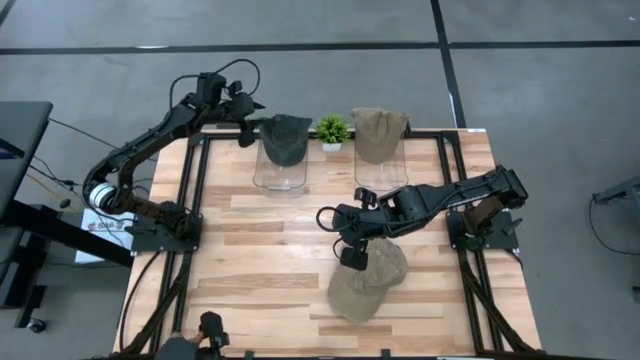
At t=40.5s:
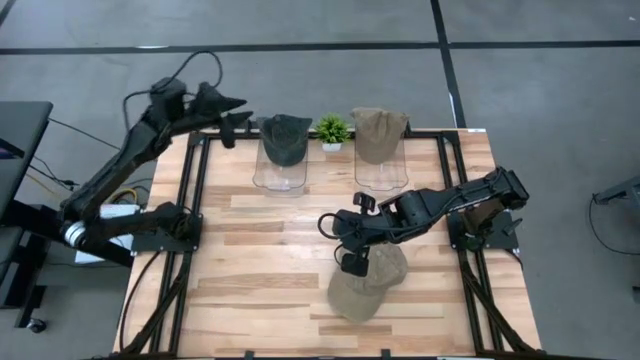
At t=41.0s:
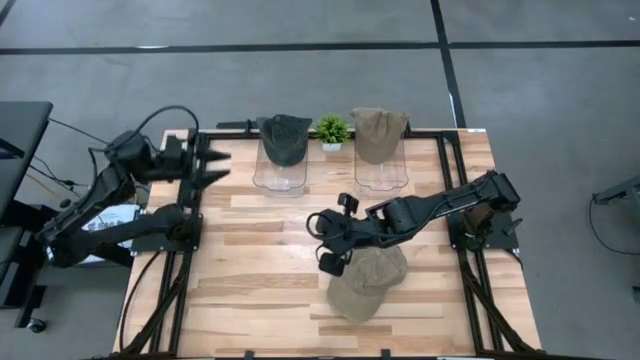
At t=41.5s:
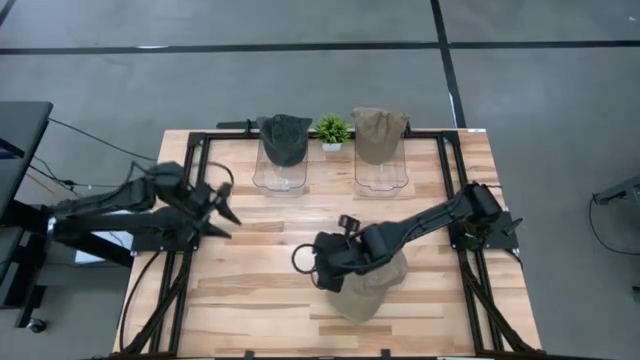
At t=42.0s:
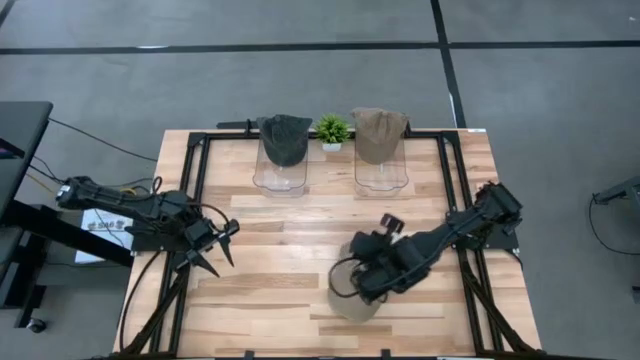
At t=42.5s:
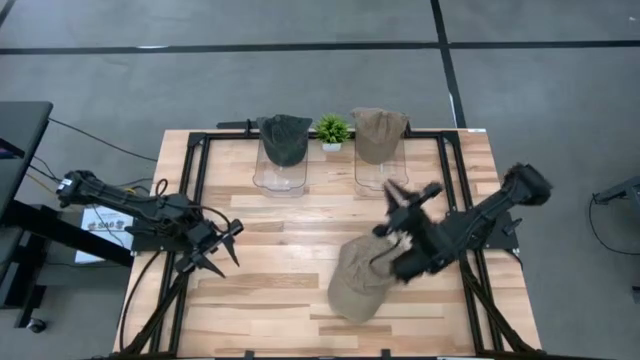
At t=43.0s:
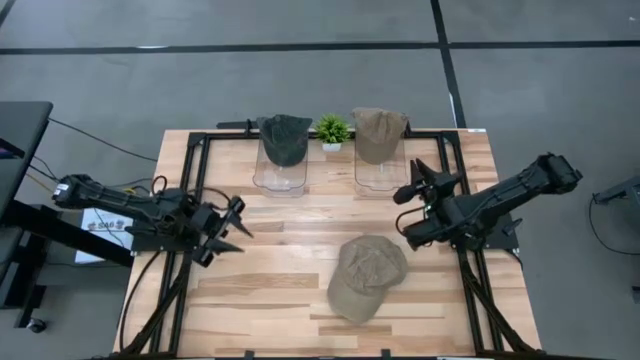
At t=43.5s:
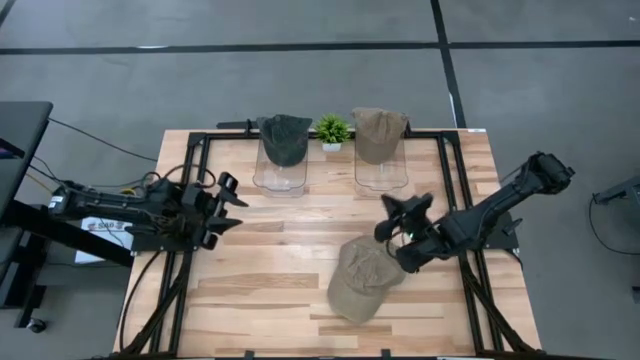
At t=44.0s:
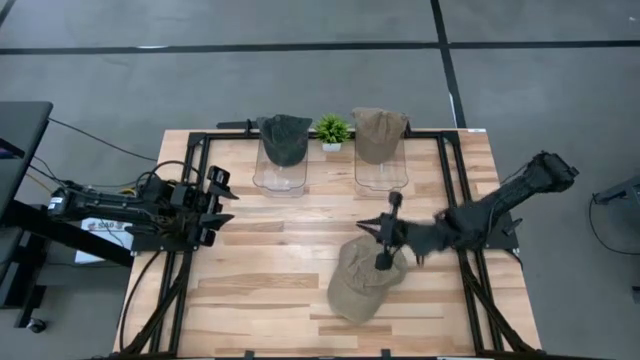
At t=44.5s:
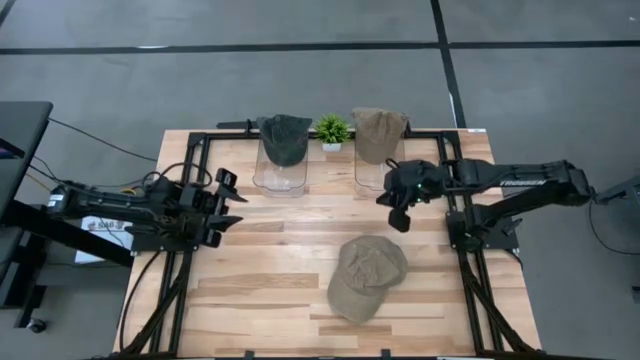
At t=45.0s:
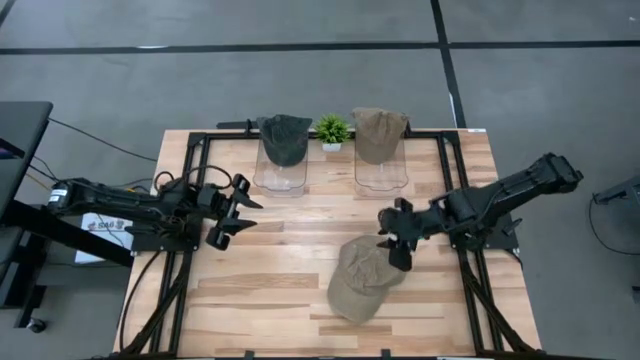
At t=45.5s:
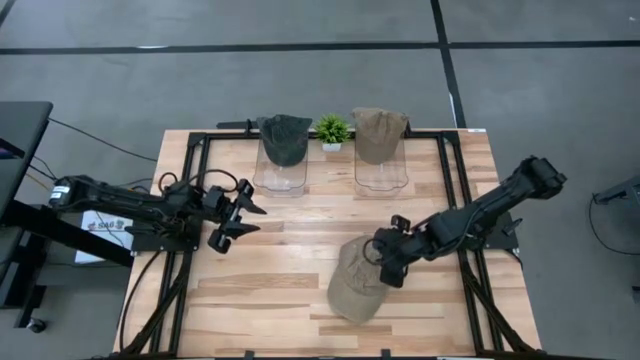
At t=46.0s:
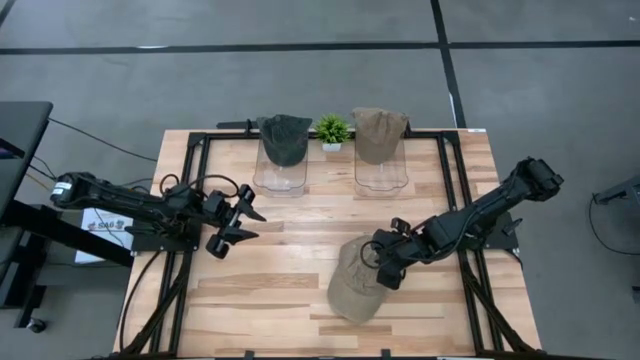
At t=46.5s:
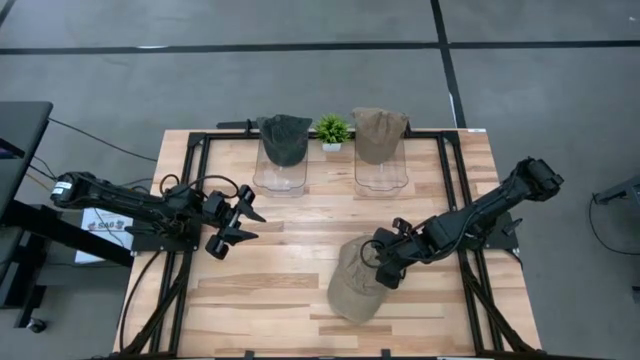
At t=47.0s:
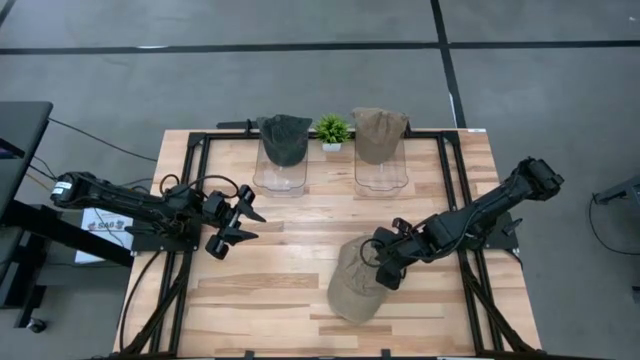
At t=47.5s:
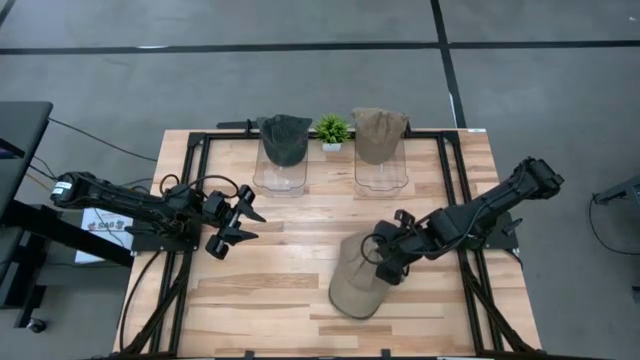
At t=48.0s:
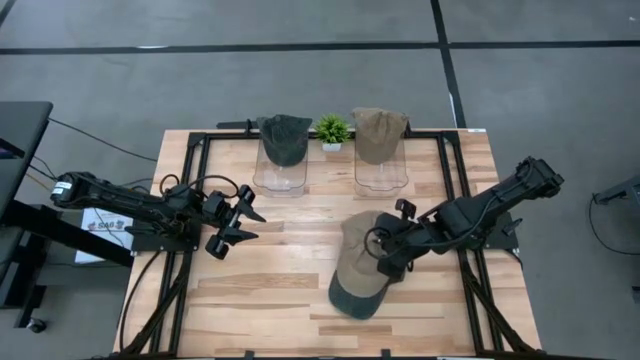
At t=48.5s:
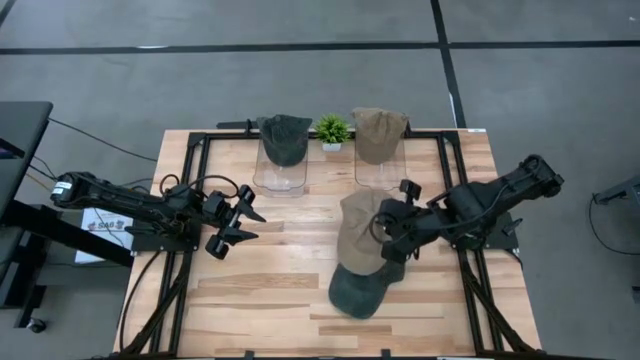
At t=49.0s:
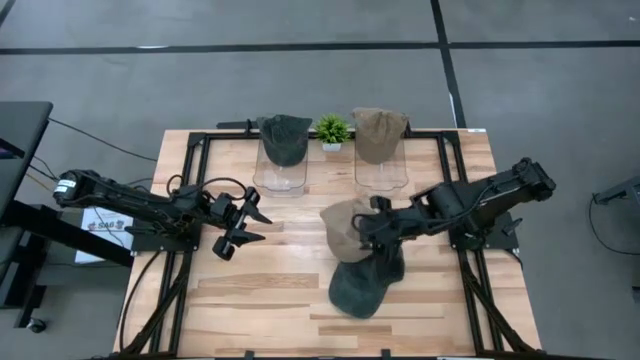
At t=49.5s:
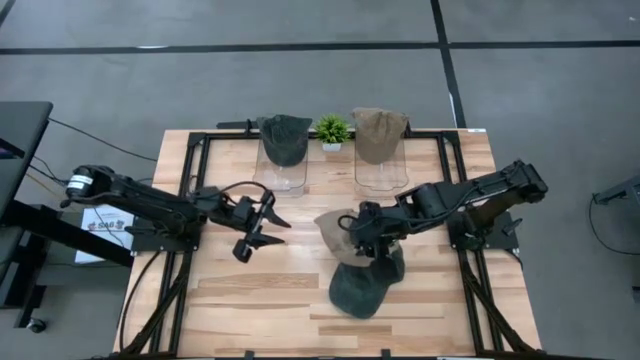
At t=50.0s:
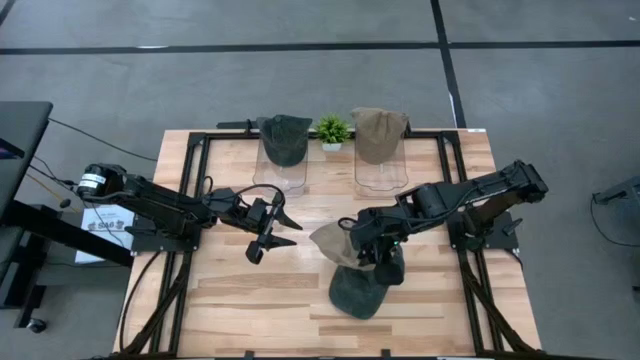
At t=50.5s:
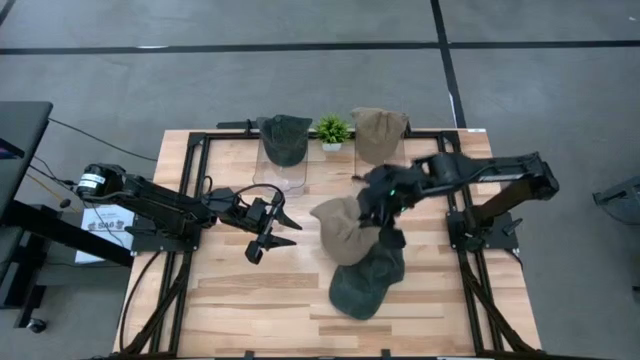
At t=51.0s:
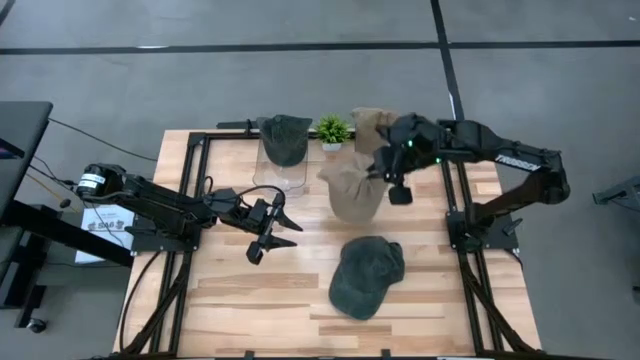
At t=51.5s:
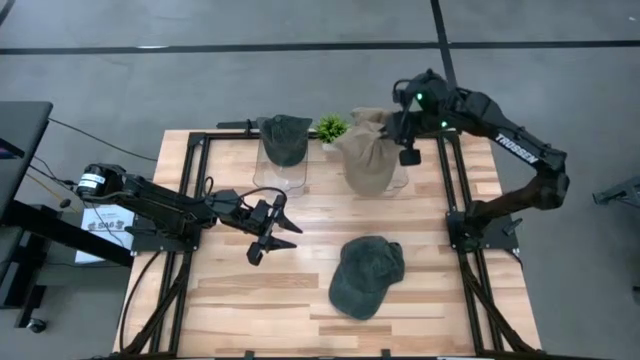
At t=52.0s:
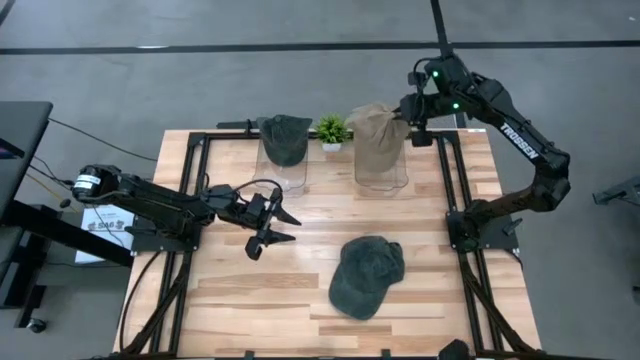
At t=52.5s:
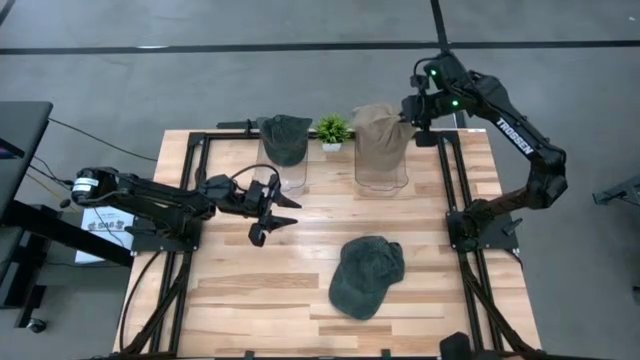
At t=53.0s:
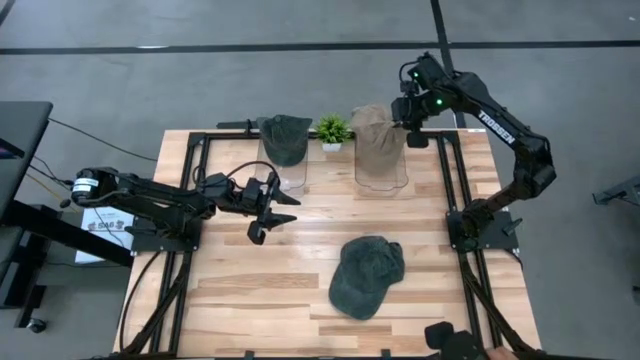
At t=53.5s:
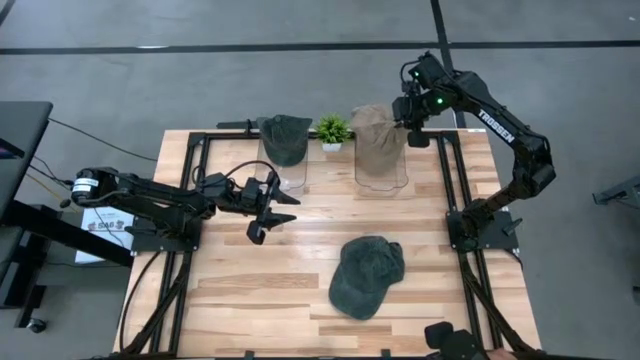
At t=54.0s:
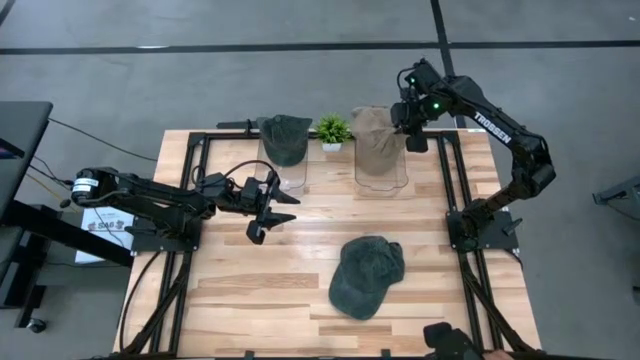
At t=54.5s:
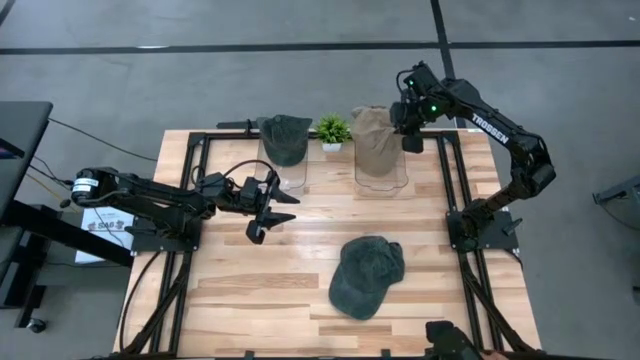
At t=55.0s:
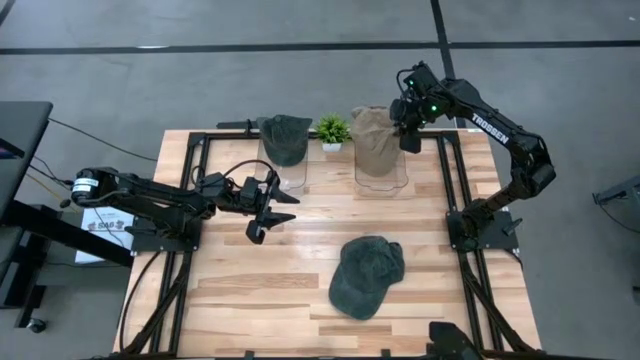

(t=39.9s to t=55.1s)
Task: Pick & Place hat
Put the brown cap into the right transparent bin

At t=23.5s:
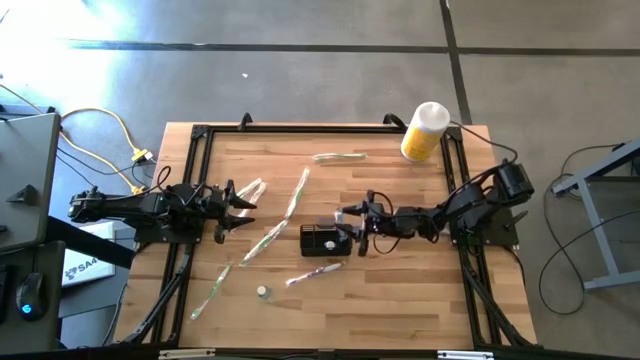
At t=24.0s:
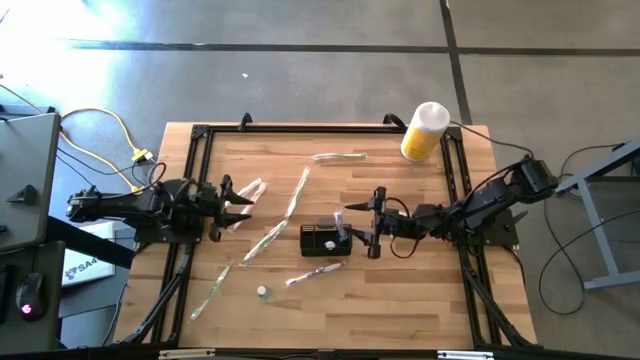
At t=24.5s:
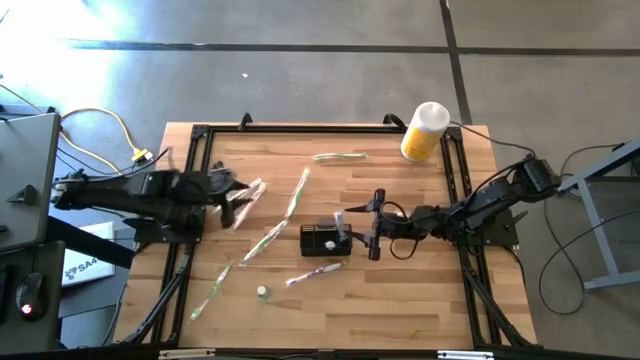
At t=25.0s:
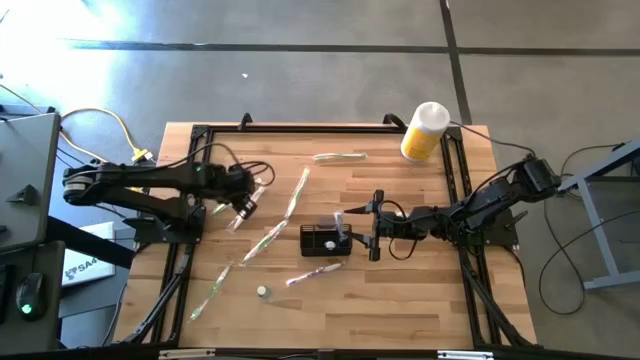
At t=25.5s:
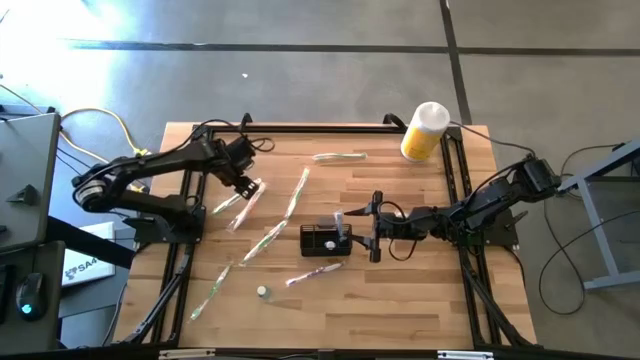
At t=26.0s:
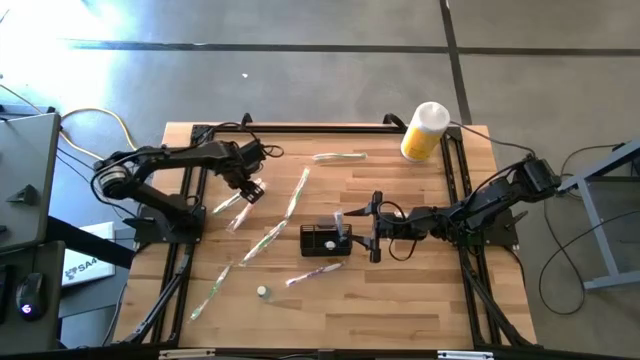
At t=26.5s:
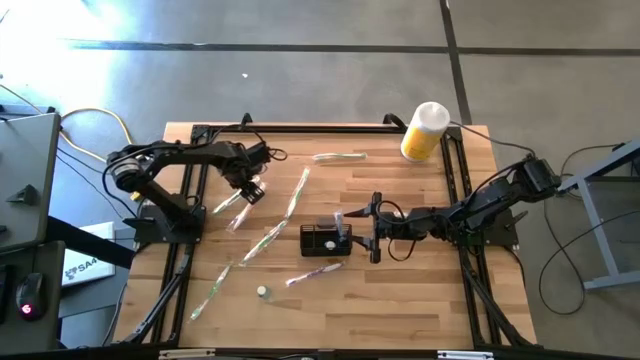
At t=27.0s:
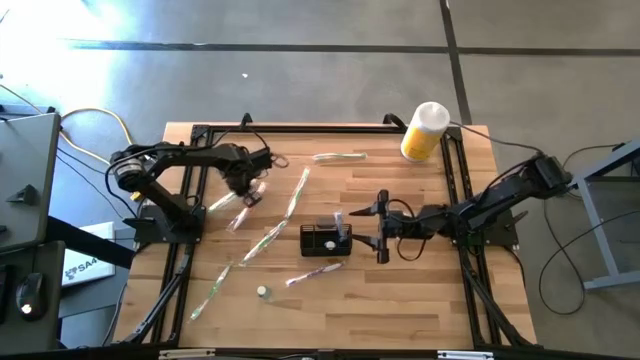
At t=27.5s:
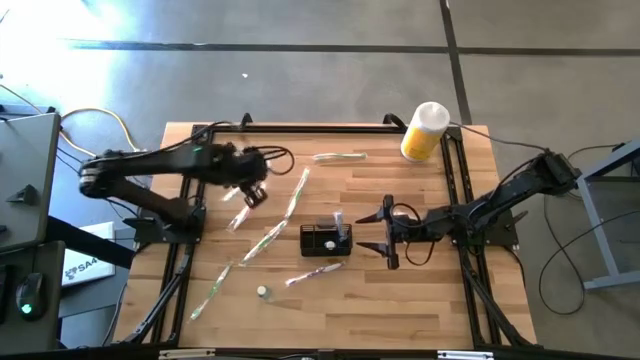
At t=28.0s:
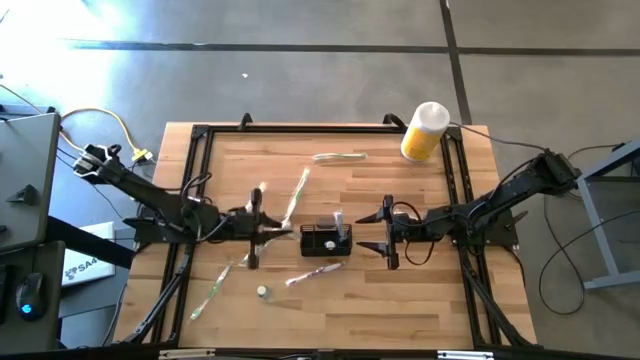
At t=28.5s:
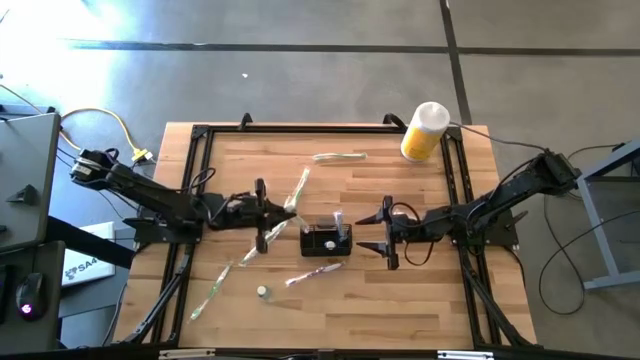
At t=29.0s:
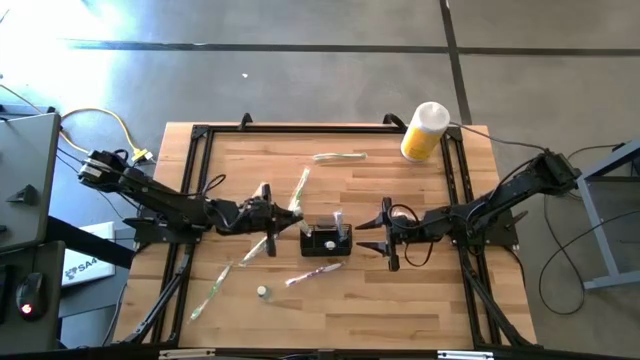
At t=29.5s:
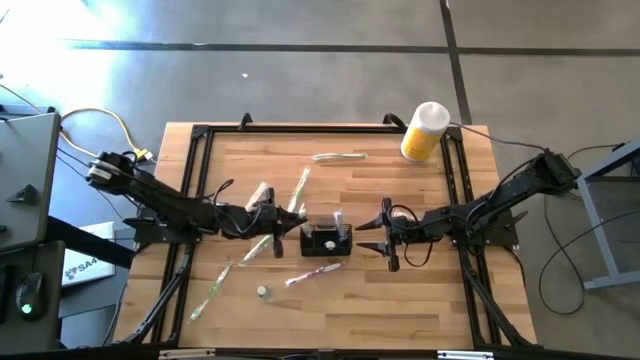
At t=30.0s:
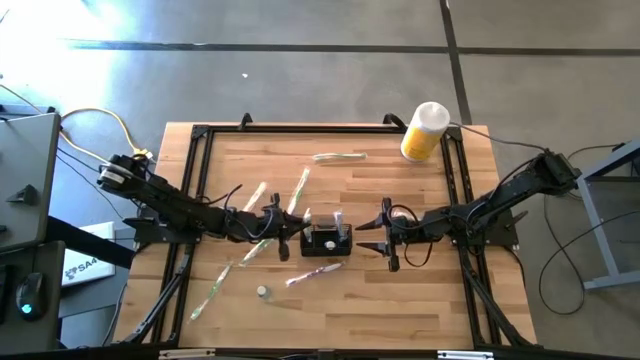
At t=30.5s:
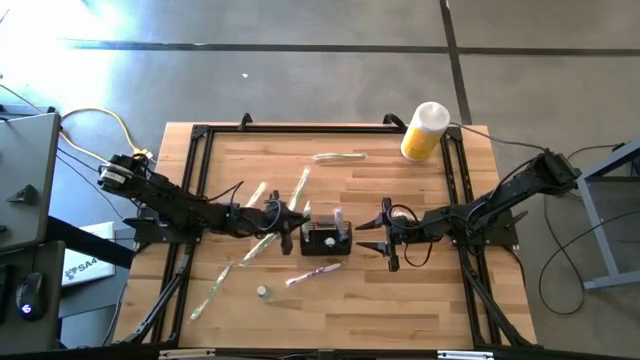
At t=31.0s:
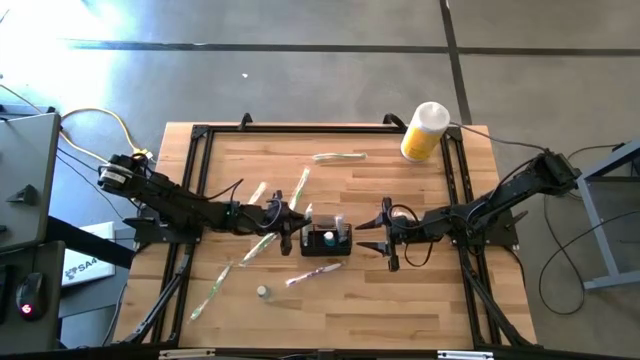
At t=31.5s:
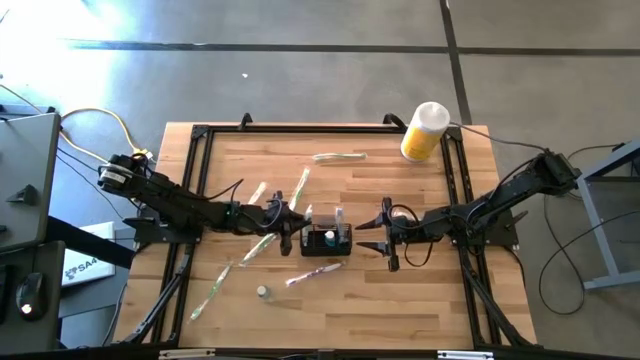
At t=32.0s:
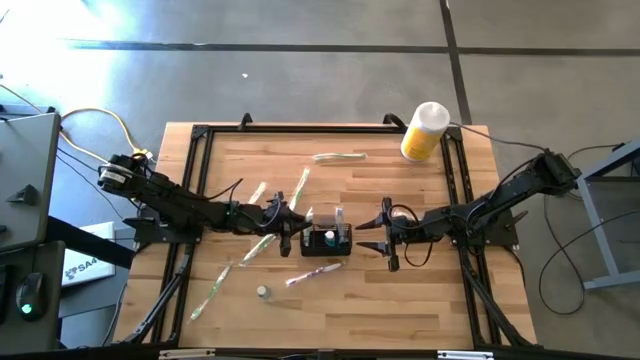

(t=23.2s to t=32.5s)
Task: Pick & Place toothbrushing station
Put the green toothbrush into the black wire organizer
